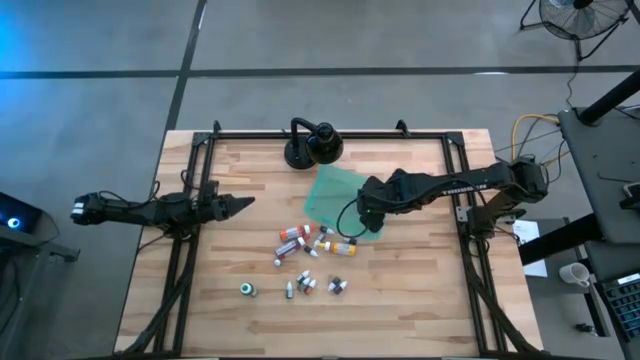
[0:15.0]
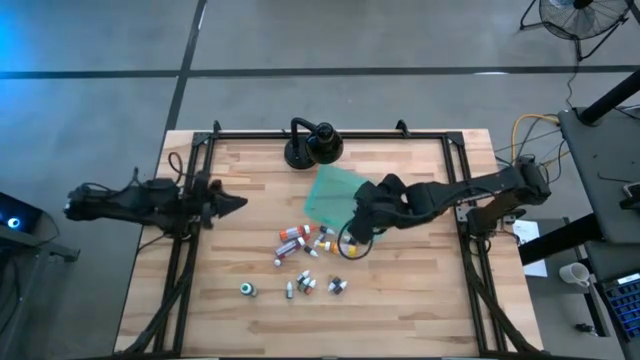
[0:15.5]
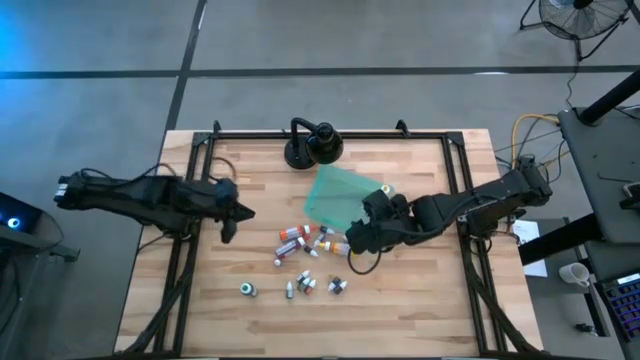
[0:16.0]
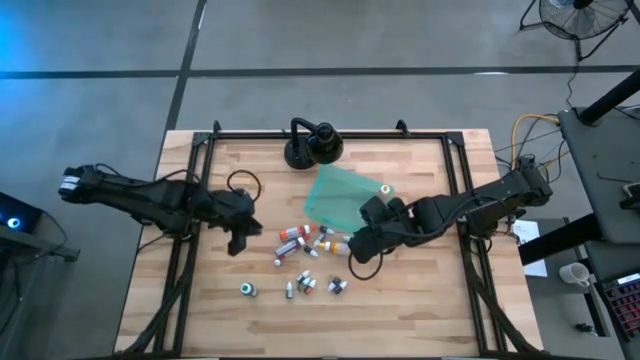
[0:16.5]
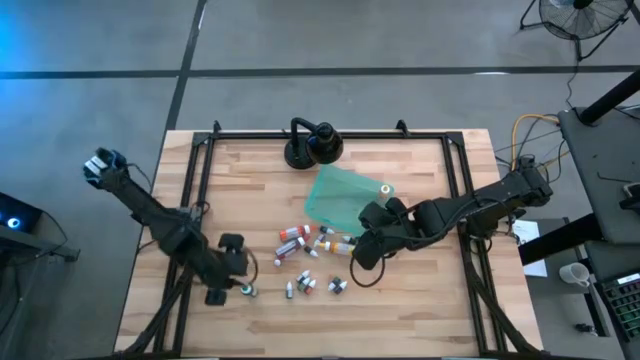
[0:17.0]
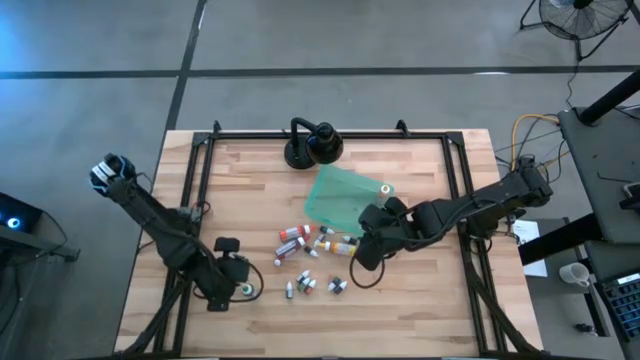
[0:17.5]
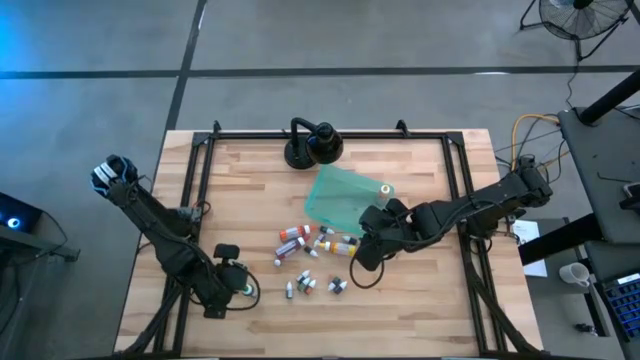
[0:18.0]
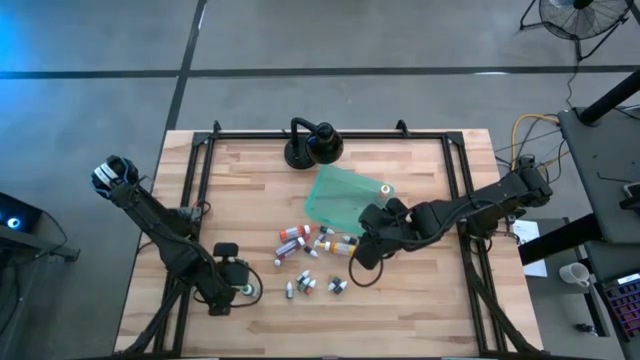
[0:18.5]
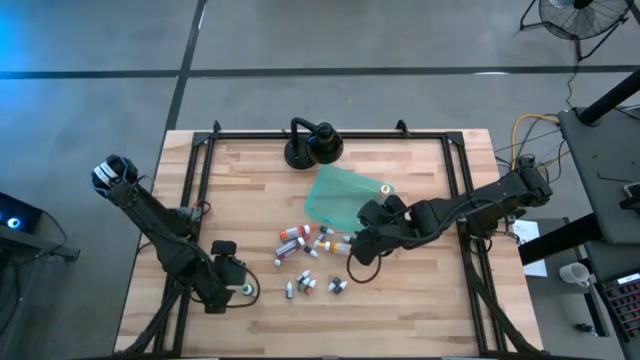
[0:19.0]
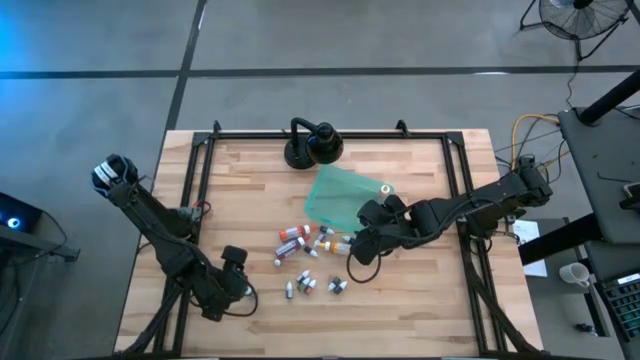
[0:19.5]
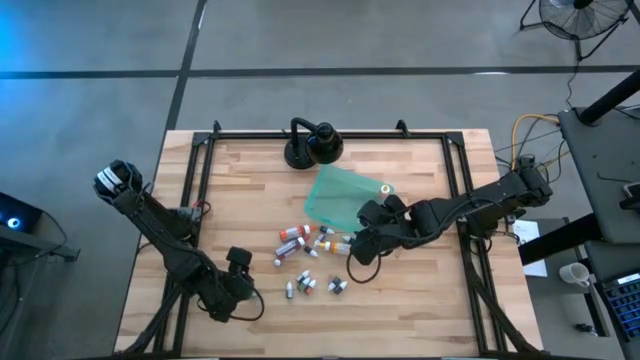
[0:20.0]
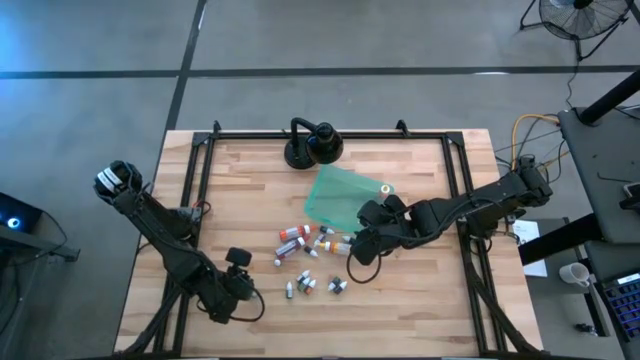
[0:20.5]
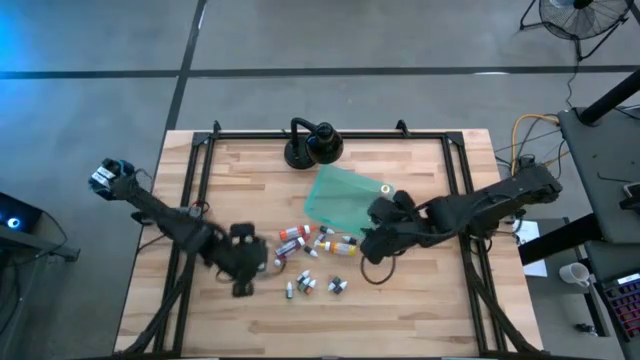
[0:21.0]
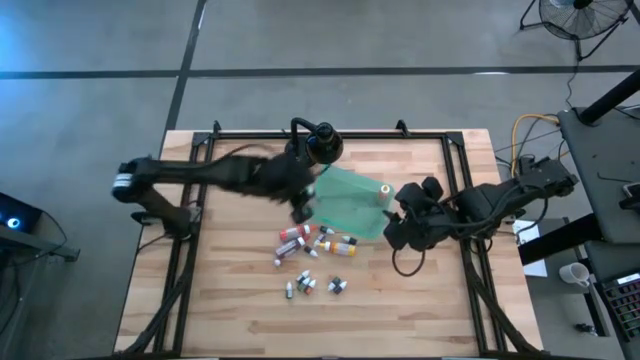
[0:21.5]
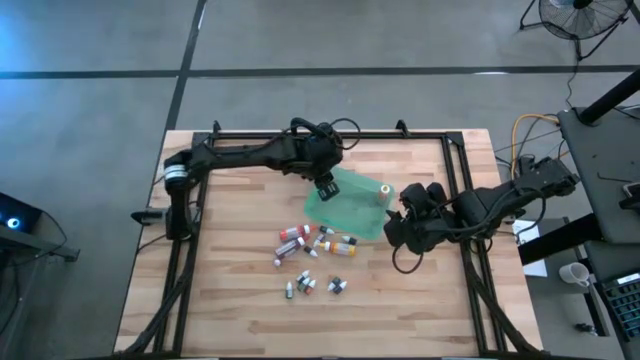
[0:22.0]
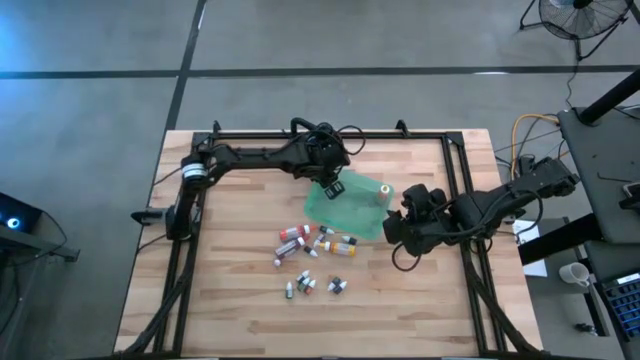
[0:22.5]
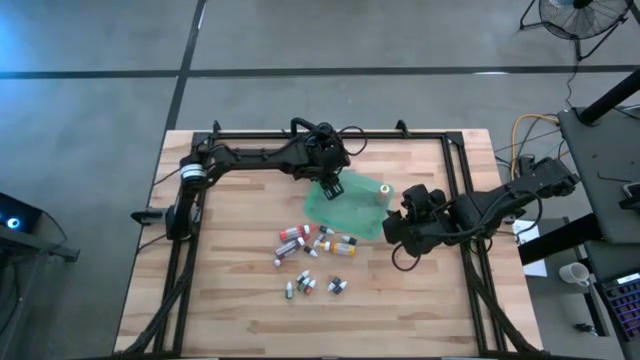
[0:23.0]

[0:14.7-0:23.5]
Task: Pick & Place food coloring
Put the large green food coloring bottle into the bin

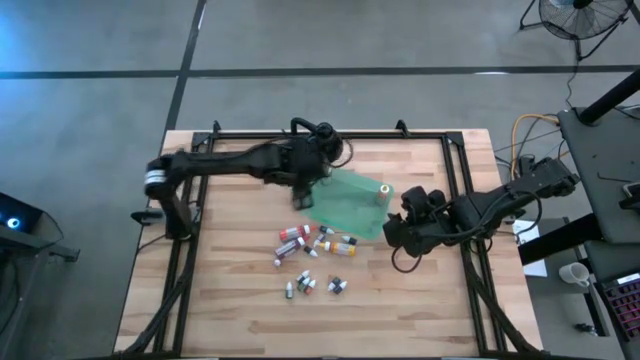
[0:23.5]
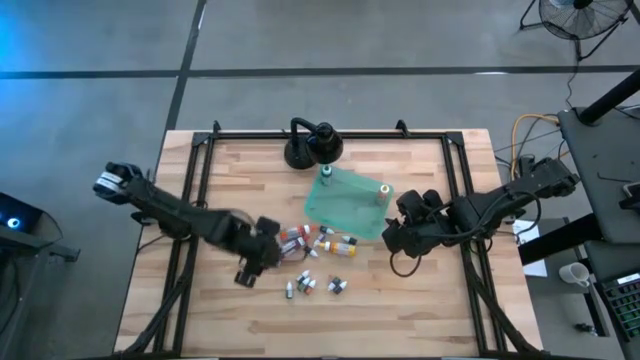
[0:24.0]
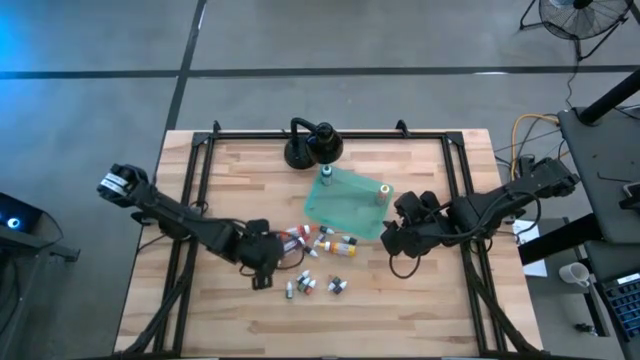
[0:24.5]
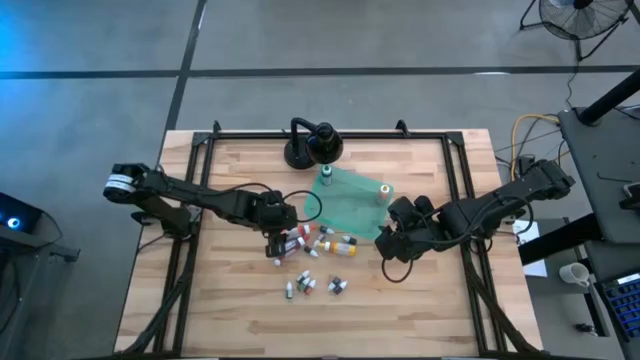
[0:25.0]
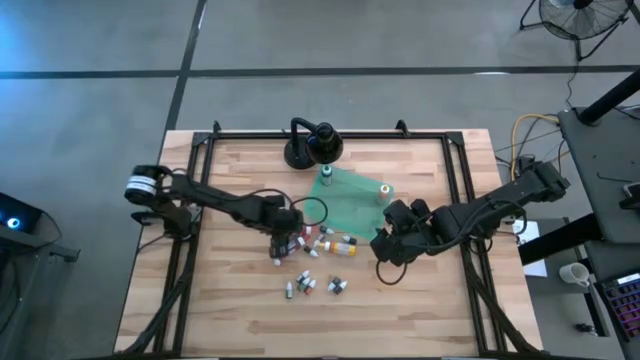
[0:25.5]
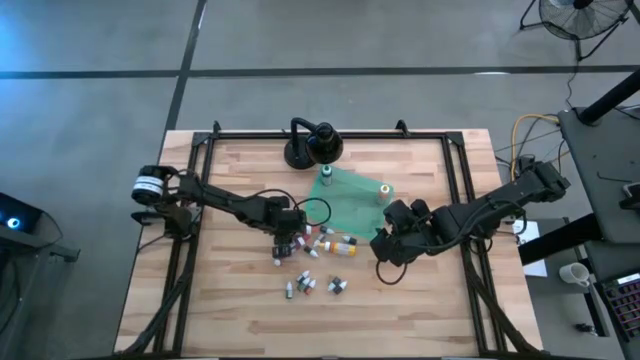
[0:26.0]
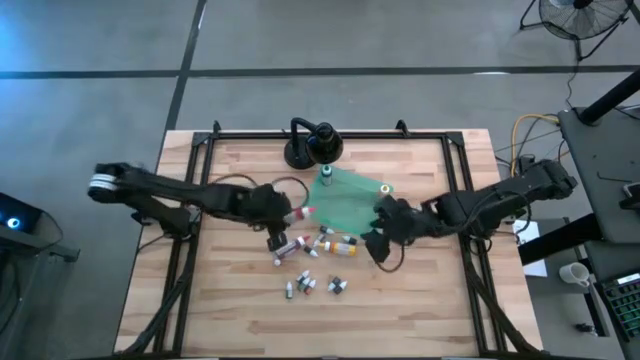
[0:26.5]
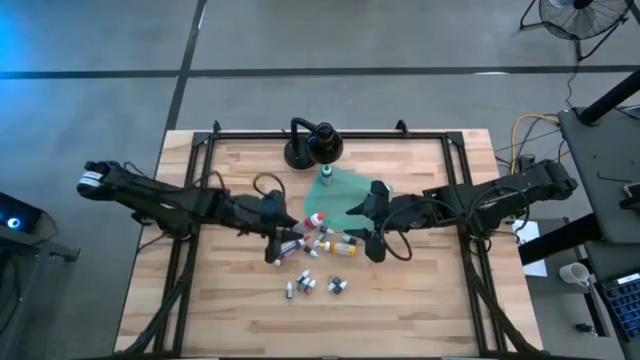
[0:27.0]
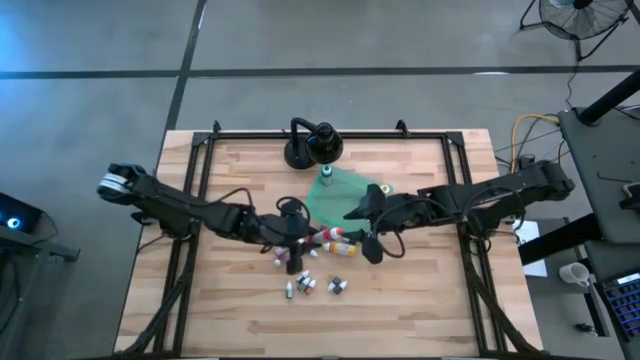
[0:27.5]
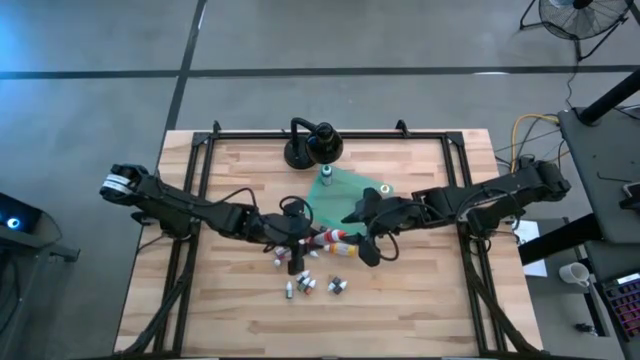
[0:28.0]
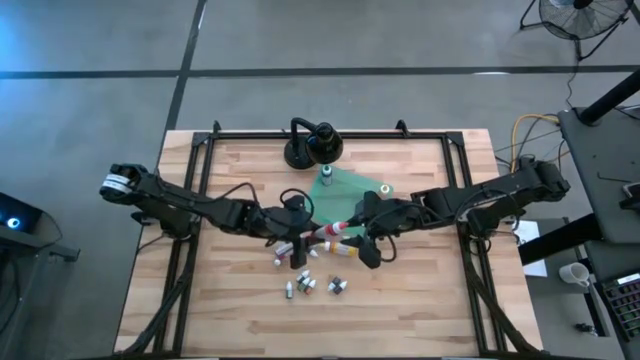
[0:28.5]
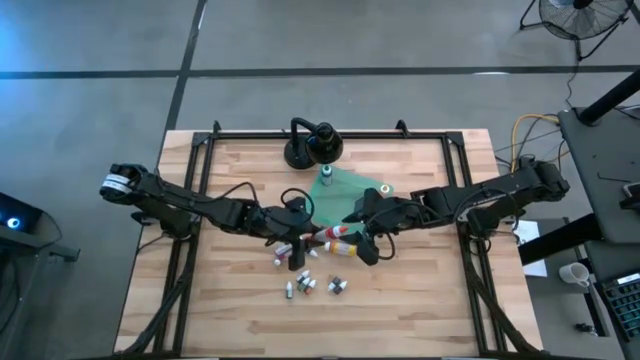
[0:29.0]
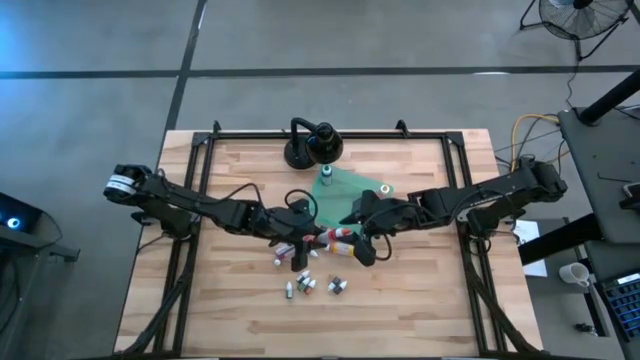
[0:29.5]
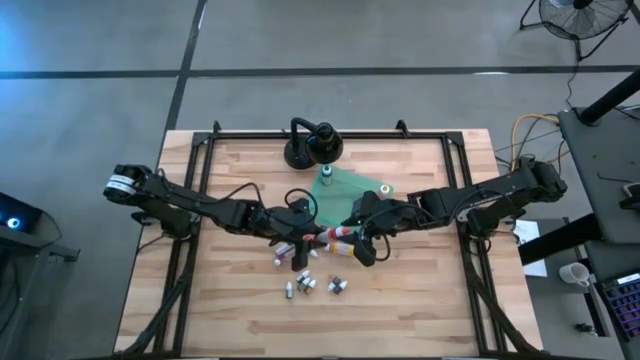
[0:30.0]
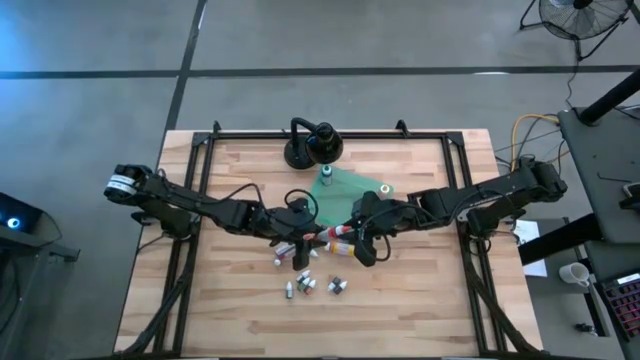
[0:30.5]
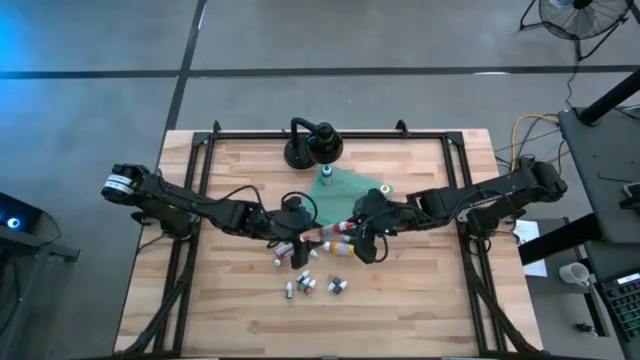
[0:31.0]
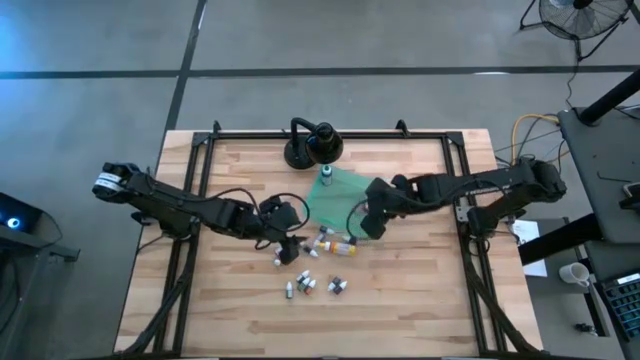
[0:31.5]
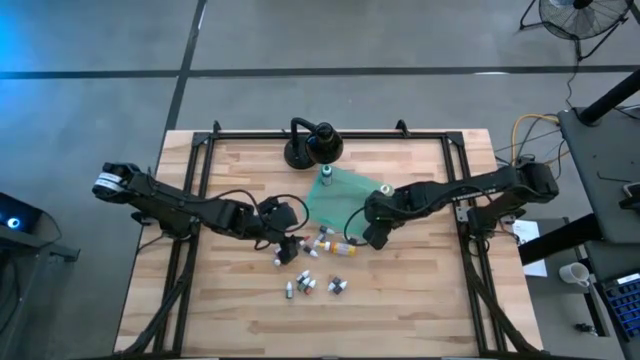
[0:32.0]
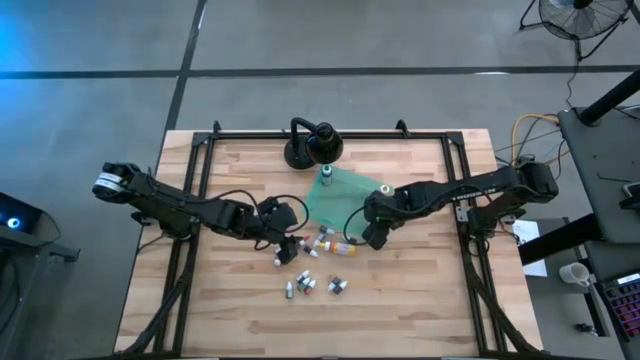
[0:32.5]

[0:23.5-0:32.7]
Put the large orange food coloring bottle into the bin

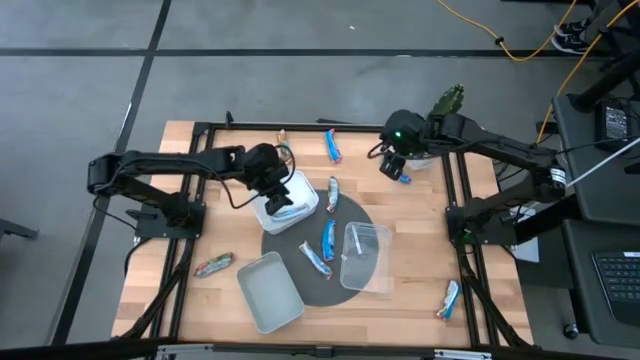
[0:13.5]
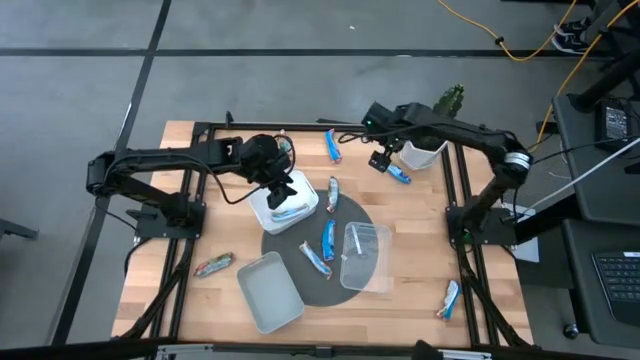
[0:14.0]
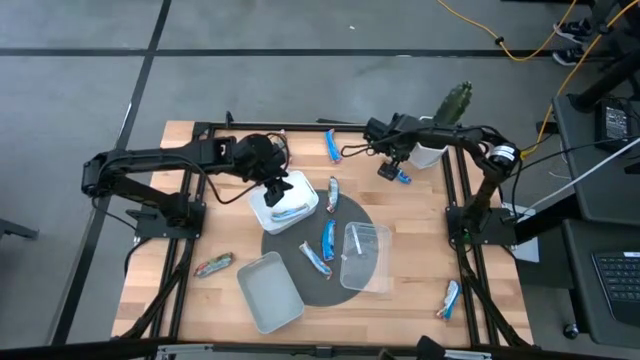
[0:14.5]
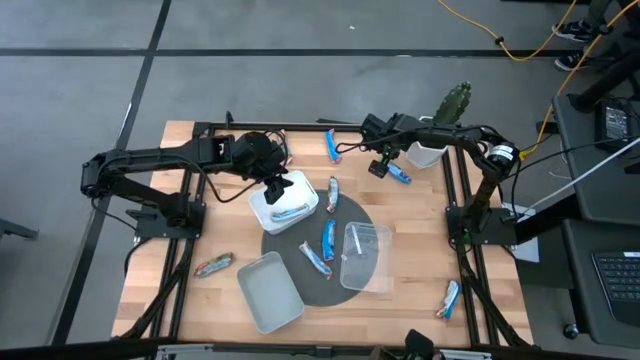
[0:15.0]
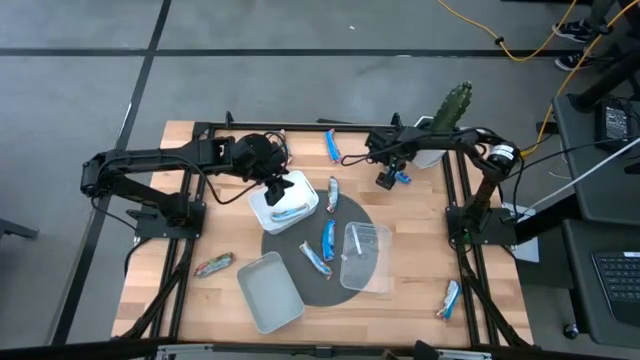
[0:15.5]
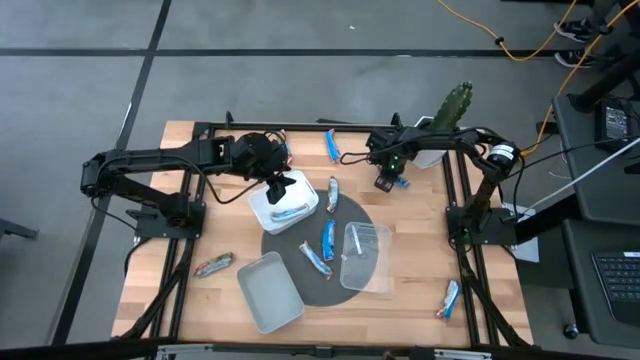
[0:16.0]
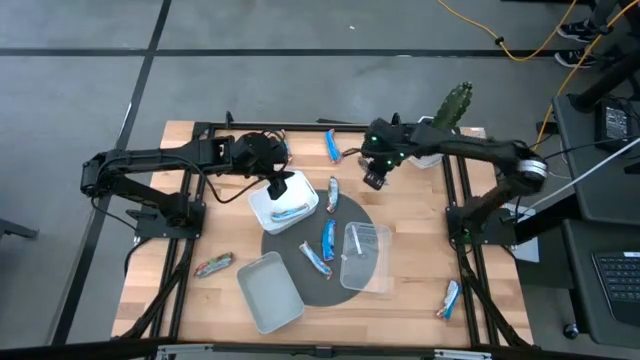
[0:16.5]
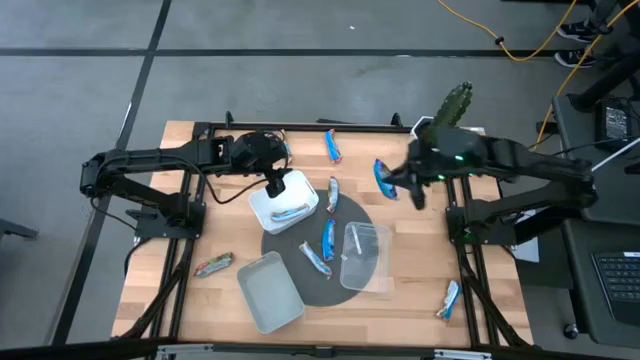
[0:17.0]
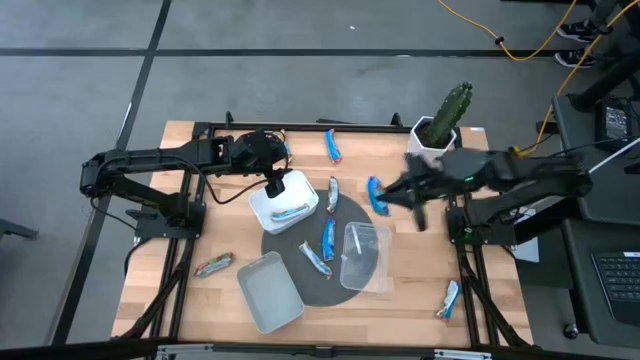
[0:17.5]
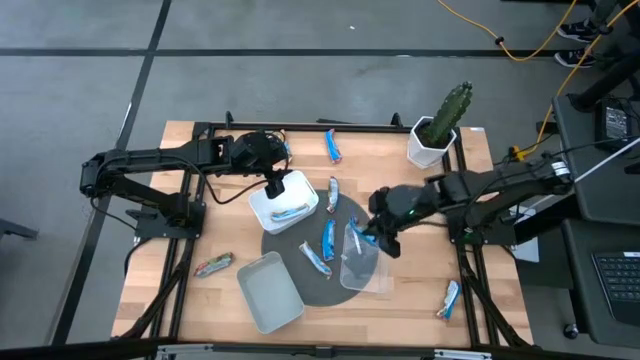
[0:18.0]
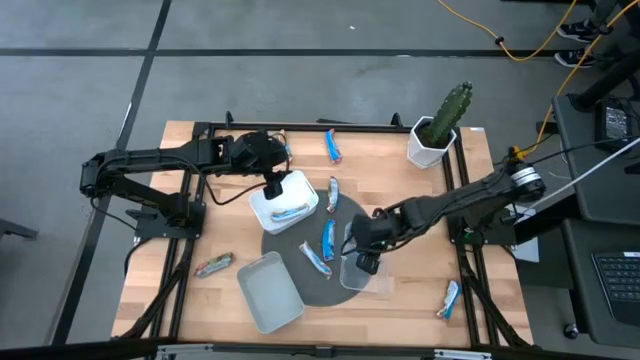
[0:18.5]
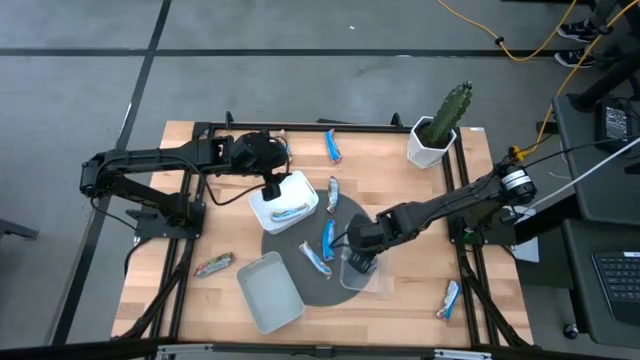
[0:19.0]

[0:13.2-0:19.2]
Task: Pick and place Granola Bars by type
Put the blue granola bar into the transparent bin
